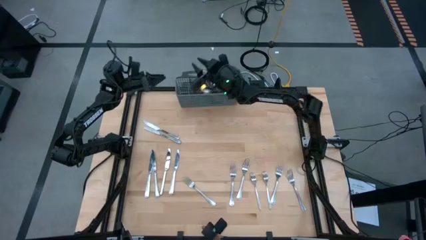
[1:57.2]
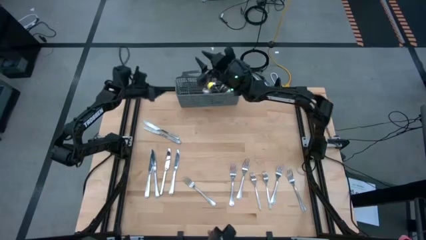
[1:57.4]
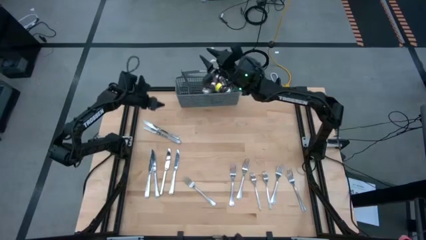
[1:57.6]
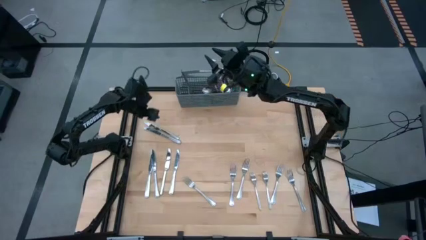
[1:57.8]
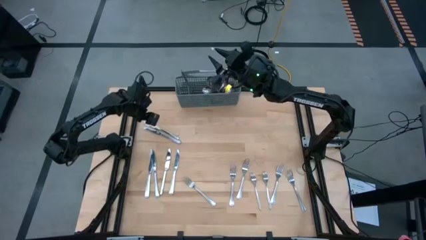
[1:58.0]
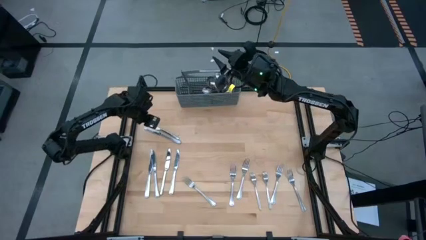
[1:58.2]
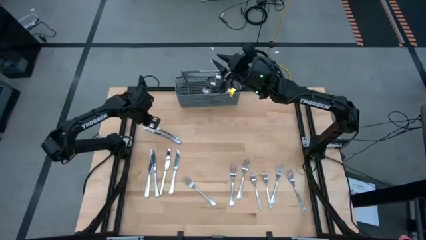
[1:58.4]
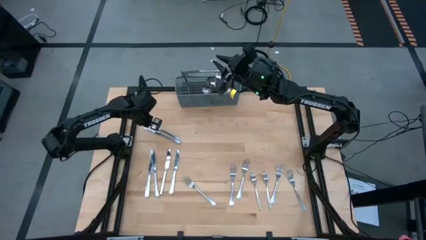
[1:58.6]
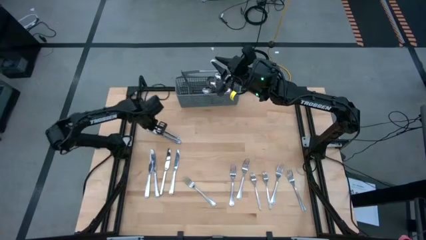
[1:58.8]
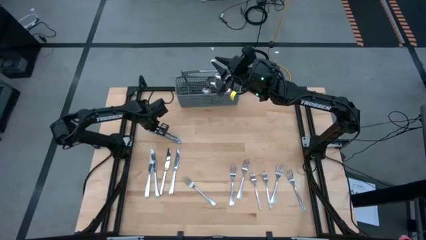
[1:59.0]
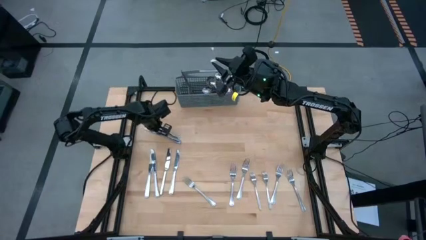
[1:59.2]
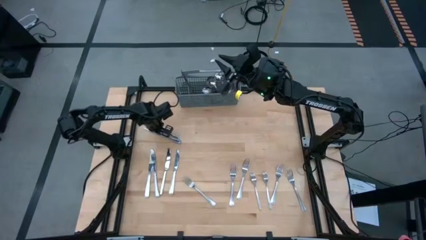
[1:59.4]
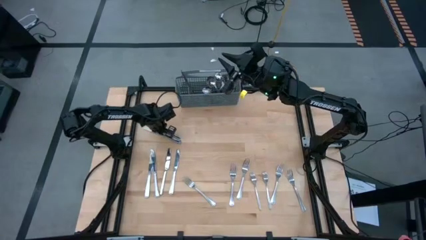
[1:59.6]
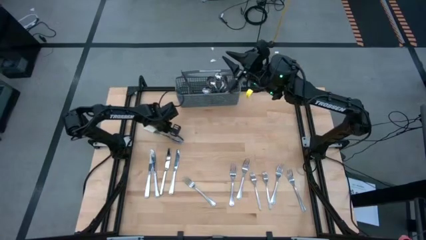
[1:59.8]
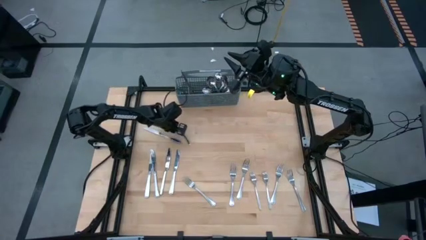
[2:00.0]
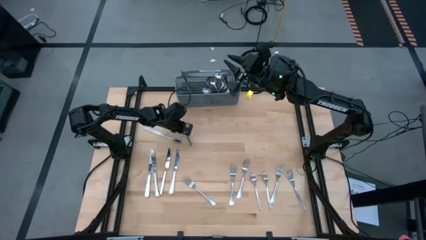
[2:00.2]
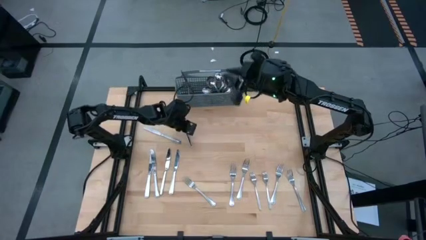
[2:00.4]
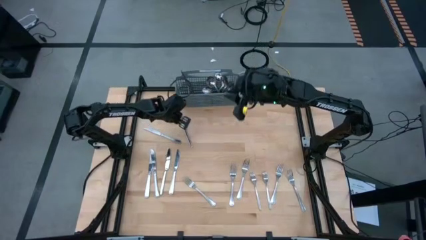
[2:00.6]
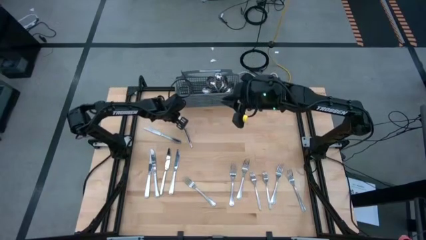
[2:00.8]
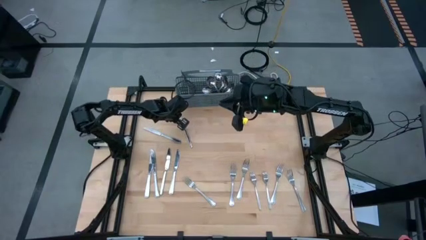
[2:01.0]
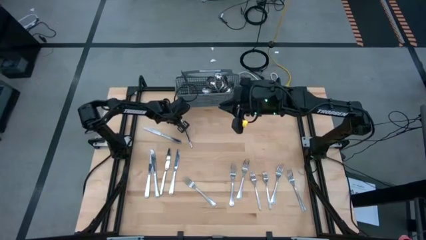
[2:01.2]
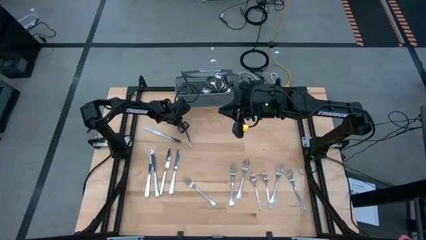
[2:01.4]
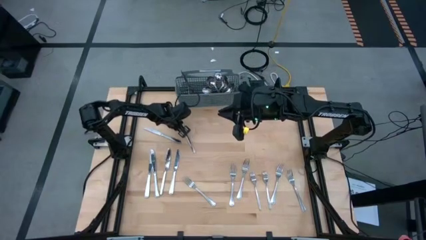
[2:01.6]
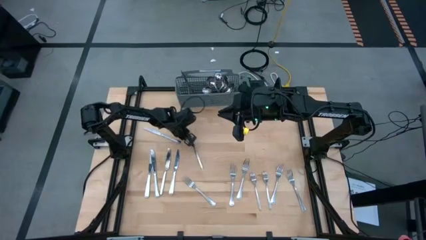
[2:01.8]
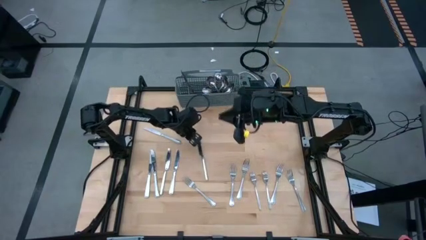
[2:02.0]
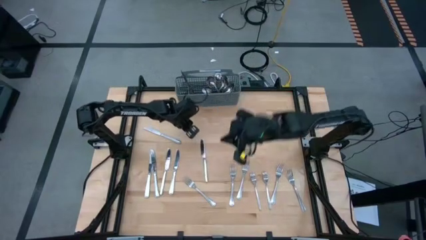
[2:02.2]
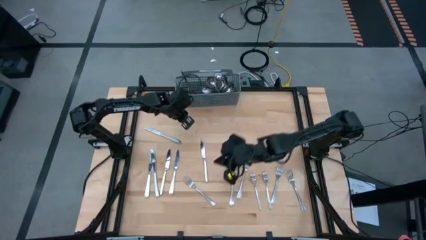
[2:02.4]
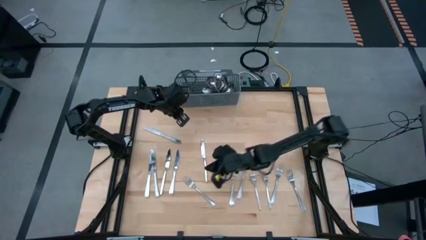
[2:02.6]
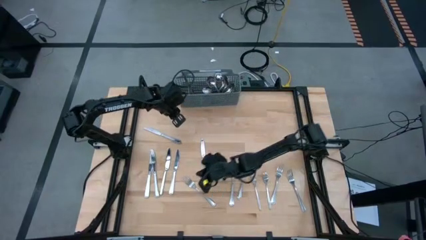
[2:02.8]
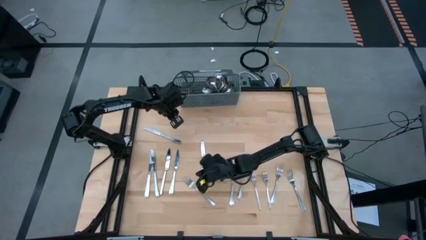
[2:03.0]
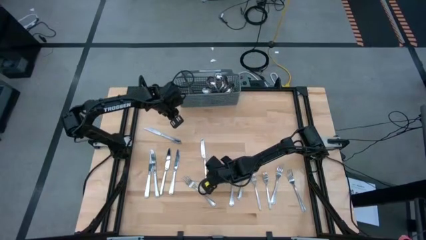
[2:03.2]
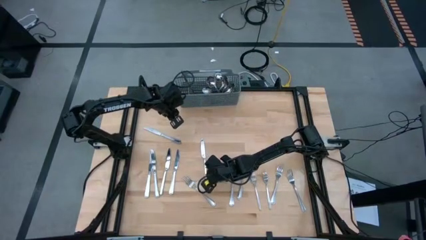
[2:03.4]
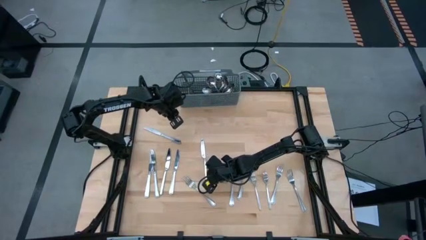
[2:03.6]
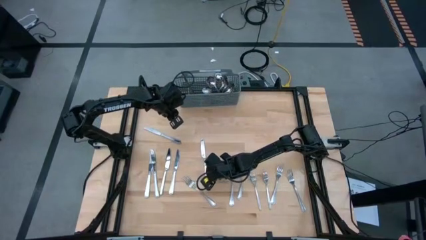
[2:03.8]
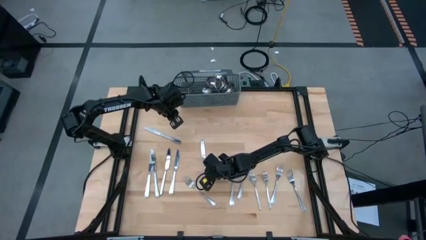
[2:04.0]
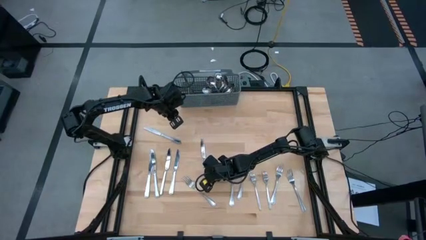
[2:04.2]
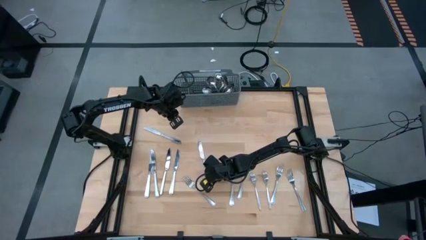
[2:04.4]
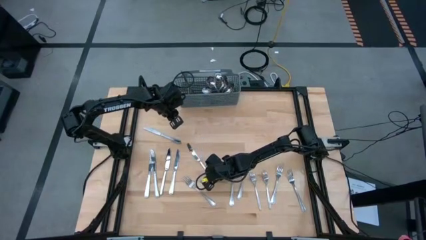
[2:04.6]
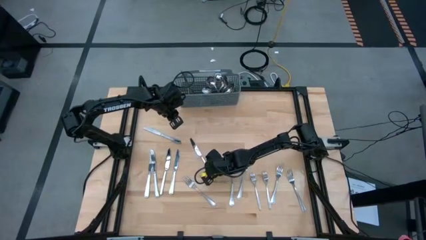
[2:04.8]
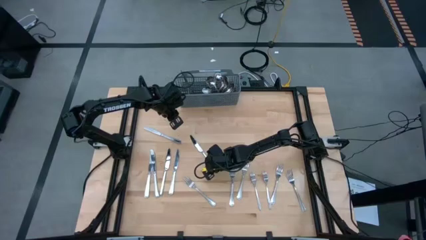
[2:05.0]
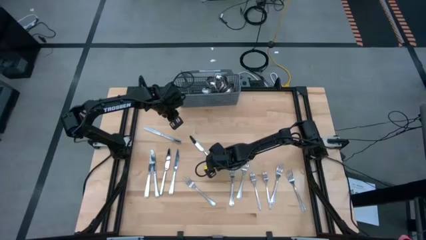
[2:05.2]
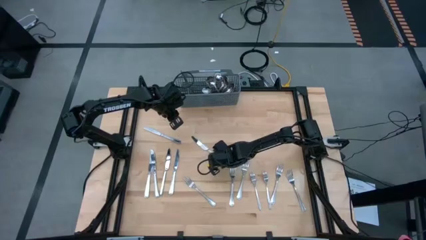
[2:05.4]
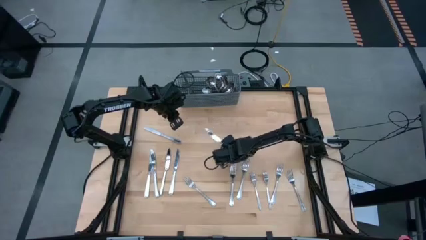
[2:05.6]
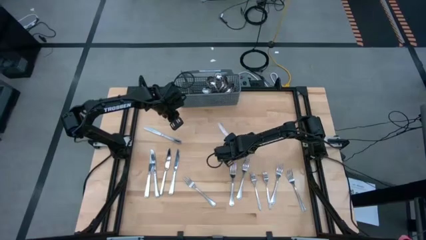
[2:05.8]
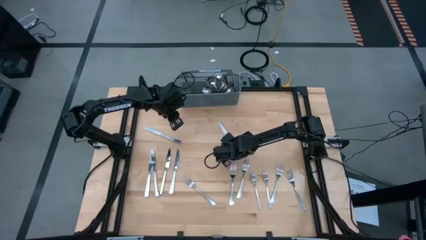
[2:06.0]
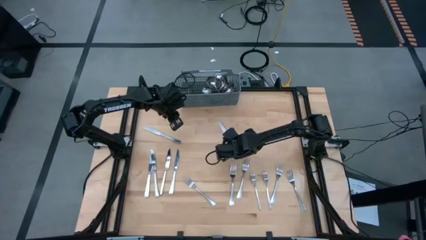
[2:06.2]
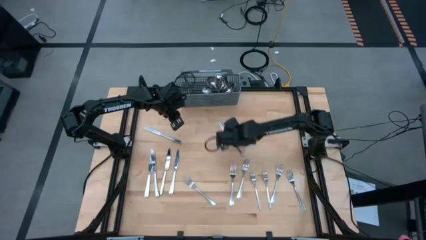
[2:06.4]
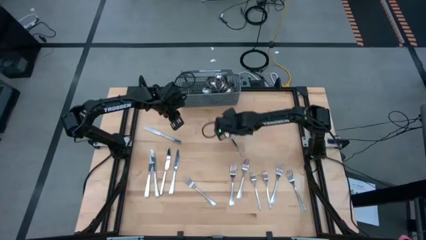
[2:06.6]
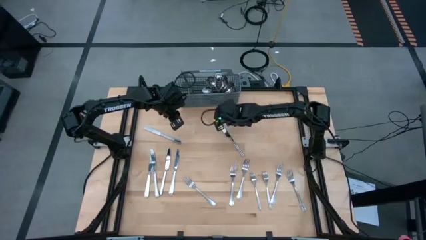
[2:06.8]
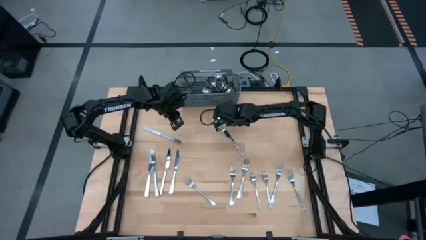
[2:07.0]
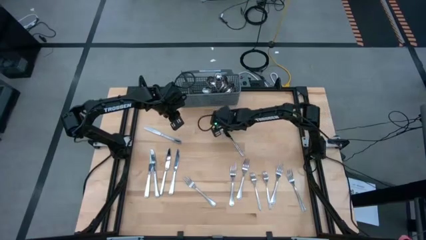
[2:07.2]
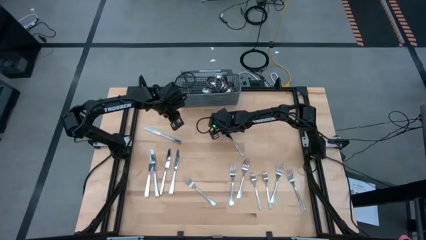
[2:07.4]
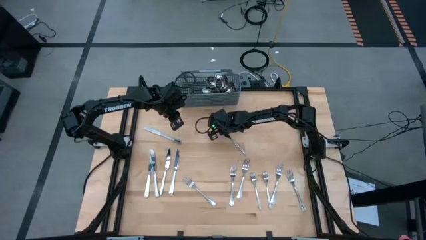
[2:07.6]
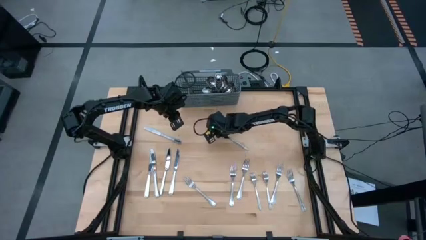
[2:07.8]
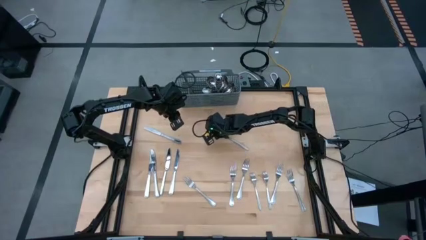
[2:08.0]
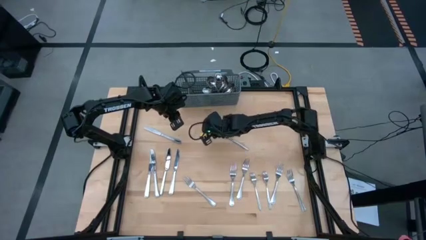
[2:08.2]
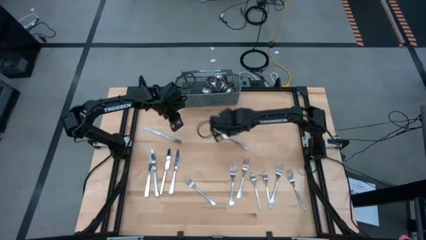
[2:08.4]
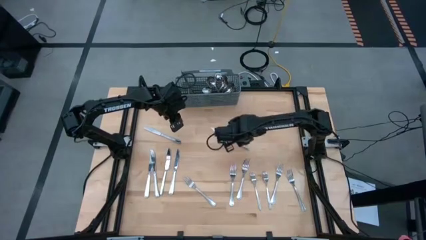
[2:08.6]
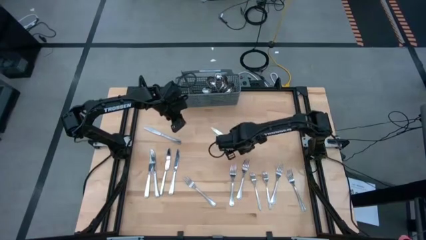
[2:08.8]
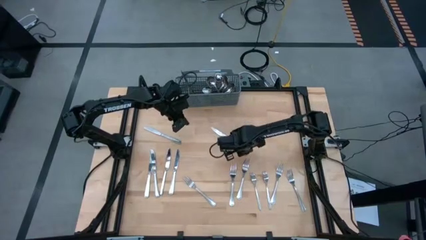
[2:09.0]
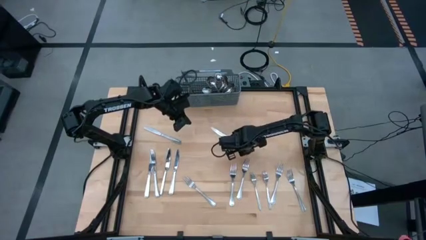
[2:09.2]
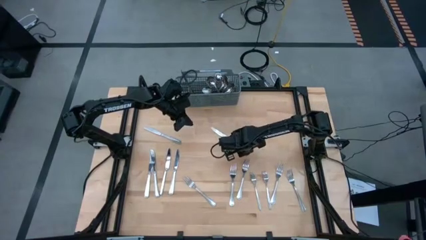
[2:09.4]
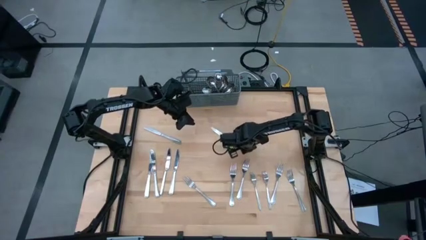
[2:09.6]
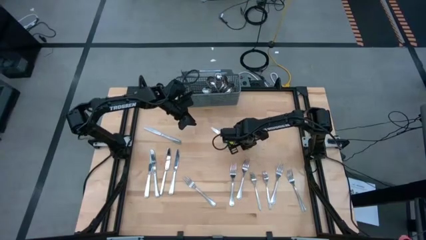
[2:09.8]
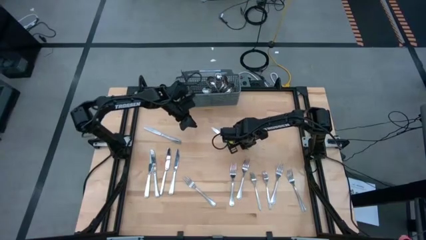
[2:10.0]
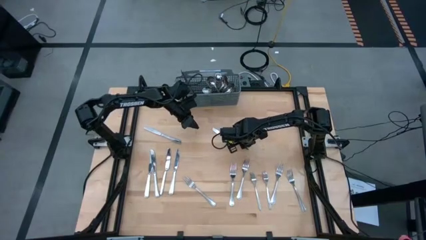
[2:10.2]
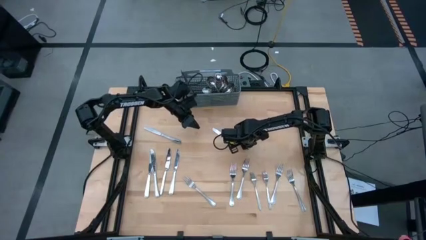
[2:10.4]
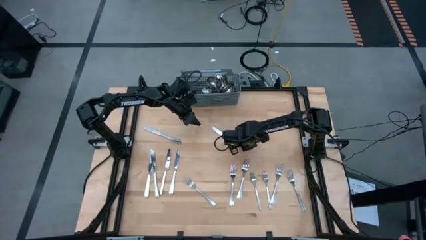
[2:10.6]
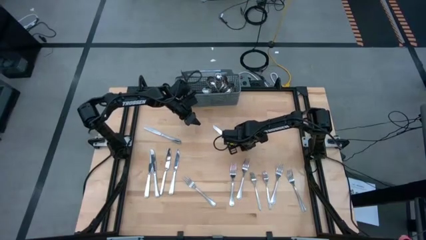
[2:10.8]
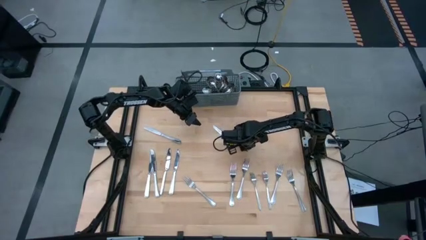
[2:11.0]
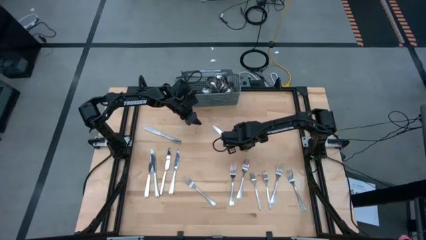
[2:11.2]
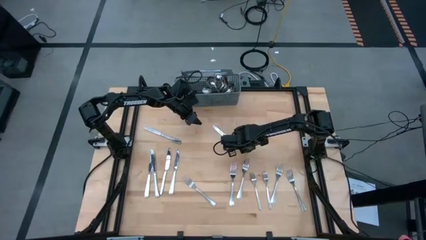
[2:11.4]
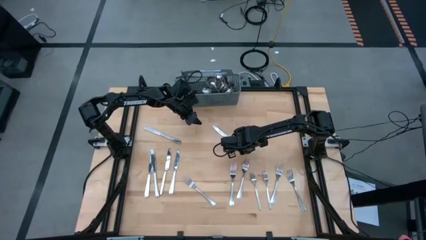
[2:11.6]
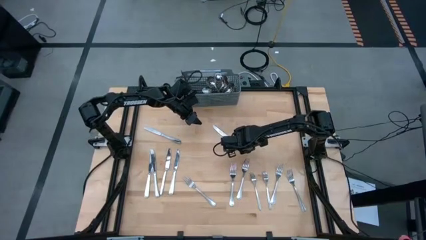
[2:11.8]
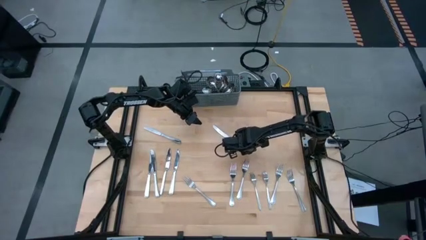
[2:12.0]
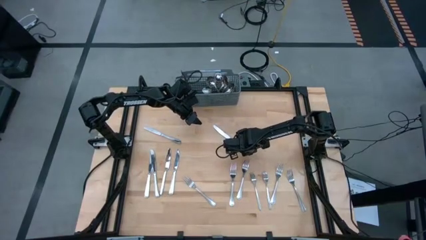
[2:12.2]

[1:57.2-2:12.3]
Task: Sort silverware
Put the silver knife into the gray utensil holder

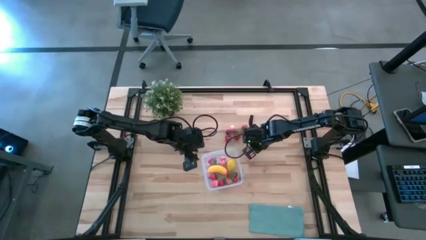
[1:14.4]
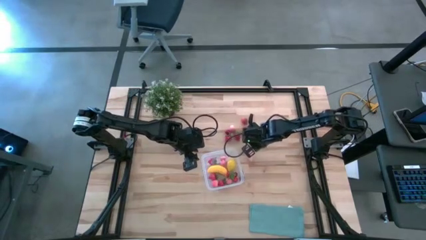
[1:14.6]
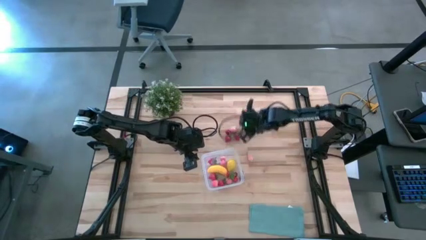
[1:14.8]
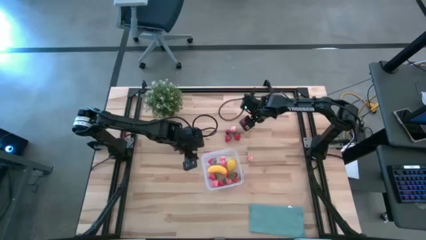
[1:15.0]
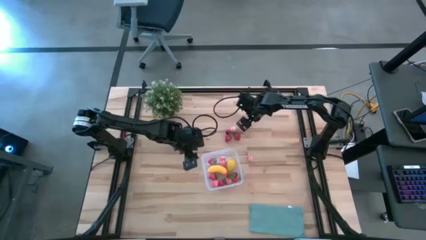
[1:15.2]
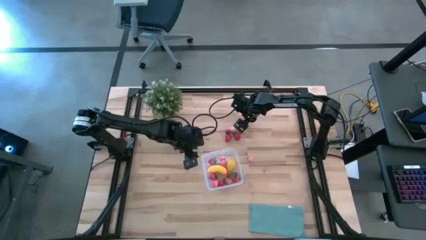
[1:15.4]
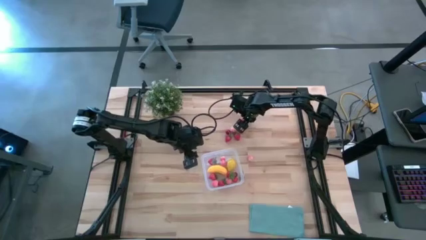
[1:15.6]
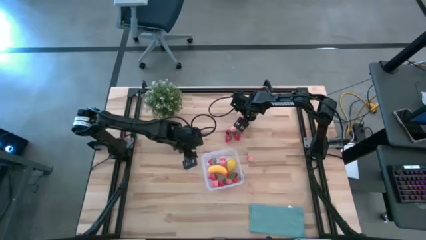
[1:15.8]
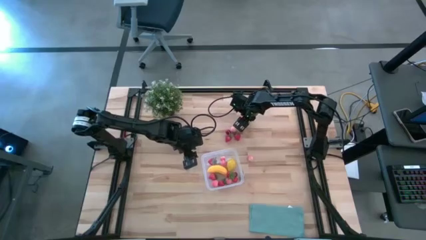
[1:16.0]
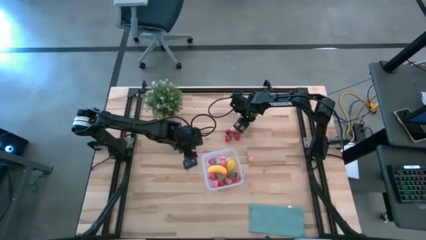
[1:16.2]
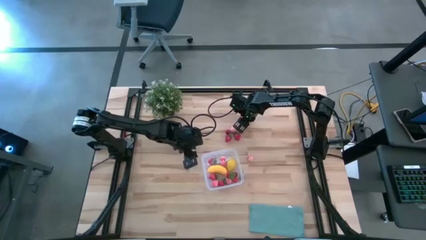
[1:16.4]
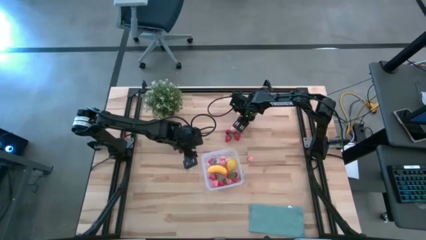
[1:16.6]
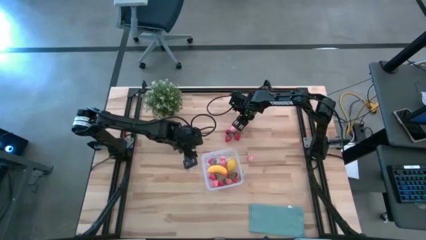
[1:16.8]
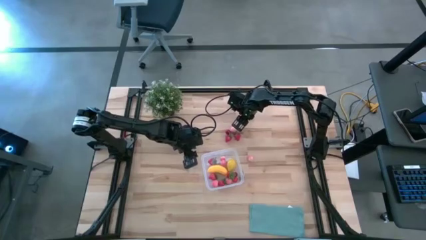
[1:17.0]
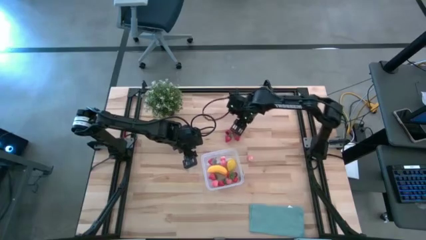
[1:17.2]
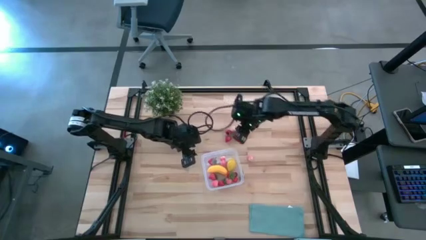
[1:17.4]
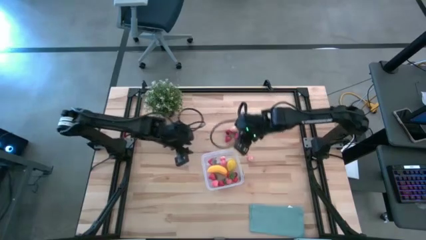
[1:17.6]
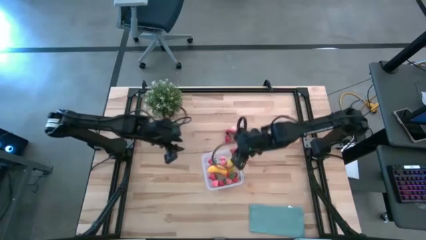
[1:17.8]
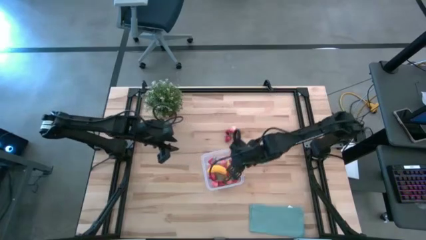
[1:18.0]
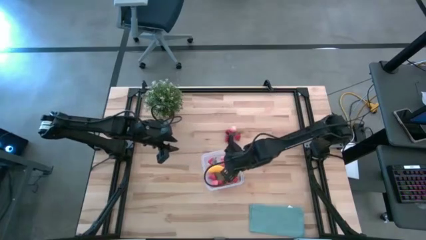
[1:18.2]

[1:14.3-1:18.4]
Task: Pick and placing Produce into tupperware
Put the red strawberry into the transparent container
